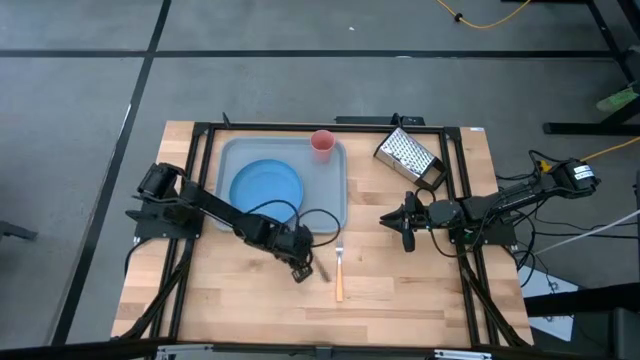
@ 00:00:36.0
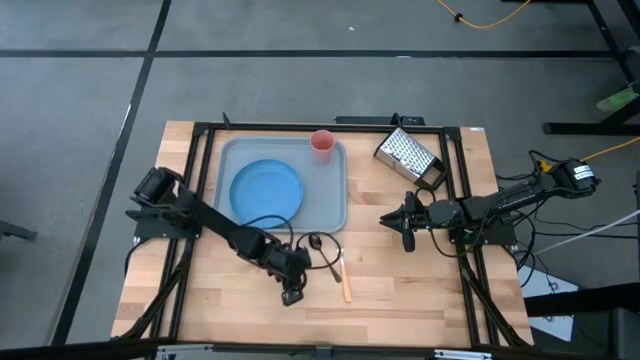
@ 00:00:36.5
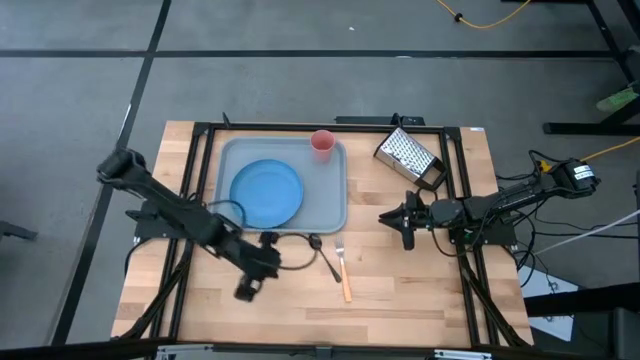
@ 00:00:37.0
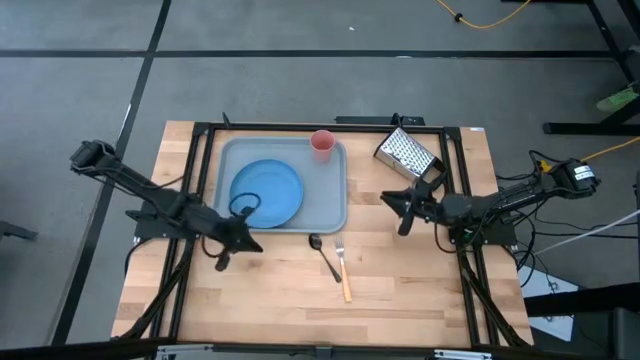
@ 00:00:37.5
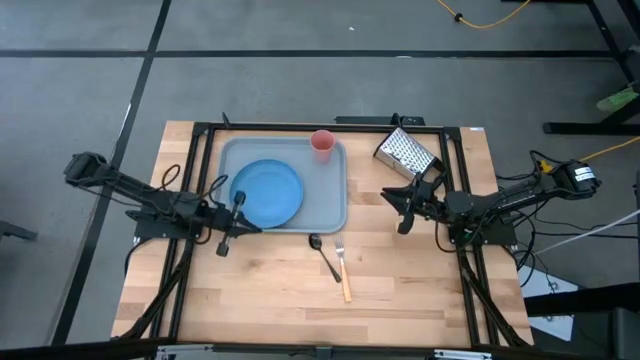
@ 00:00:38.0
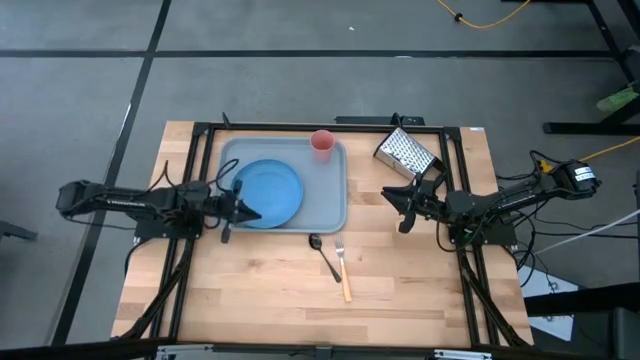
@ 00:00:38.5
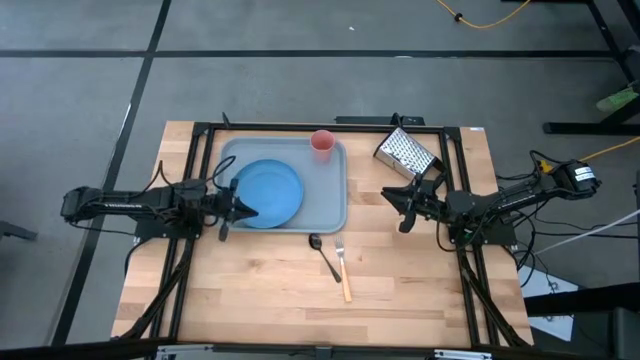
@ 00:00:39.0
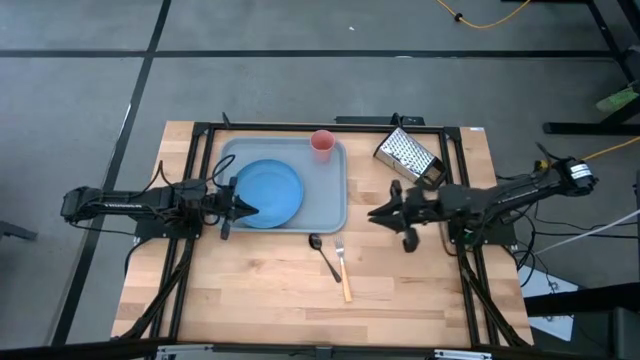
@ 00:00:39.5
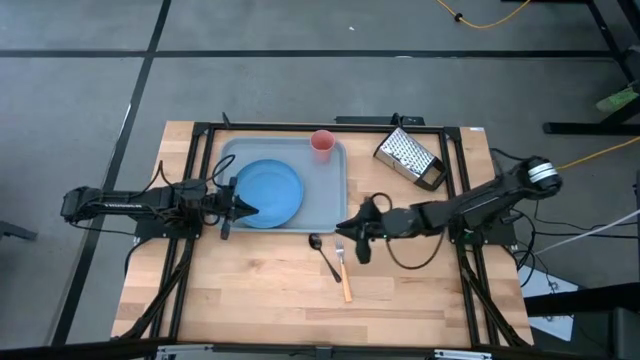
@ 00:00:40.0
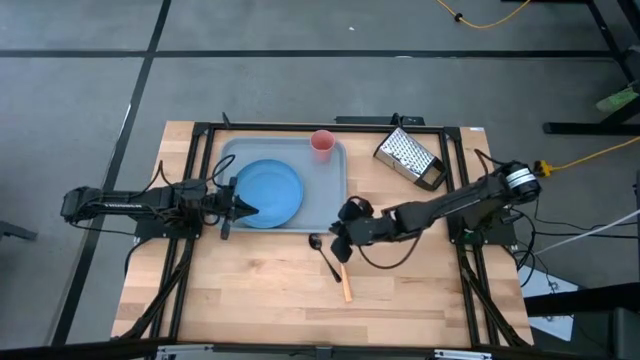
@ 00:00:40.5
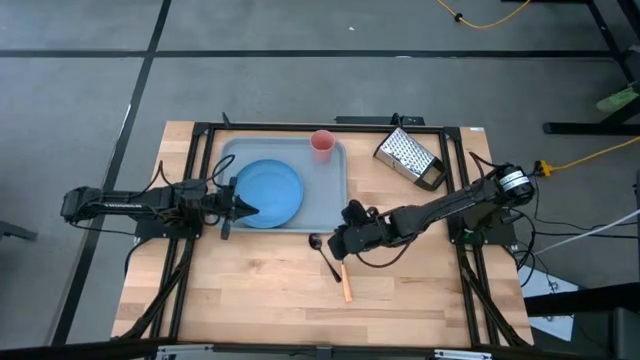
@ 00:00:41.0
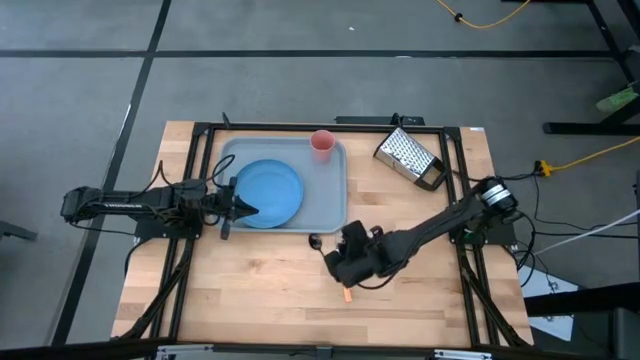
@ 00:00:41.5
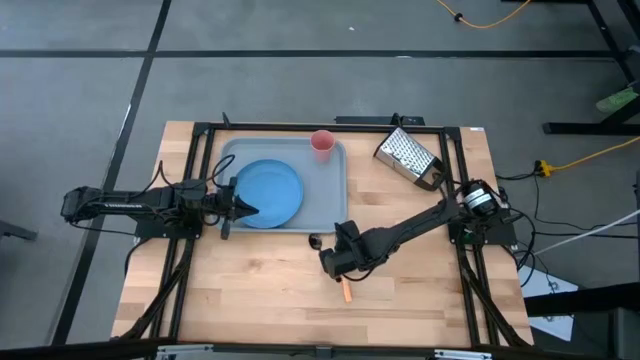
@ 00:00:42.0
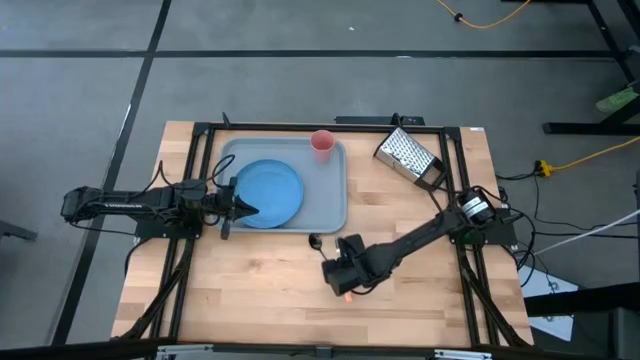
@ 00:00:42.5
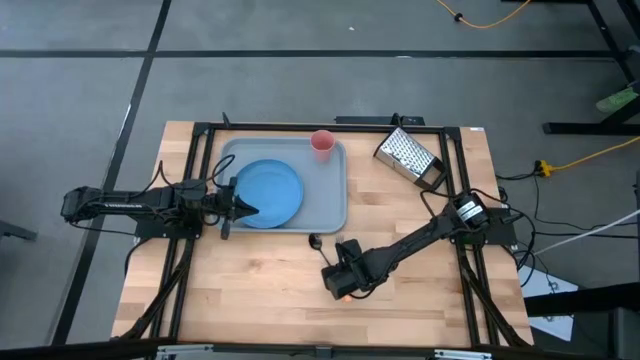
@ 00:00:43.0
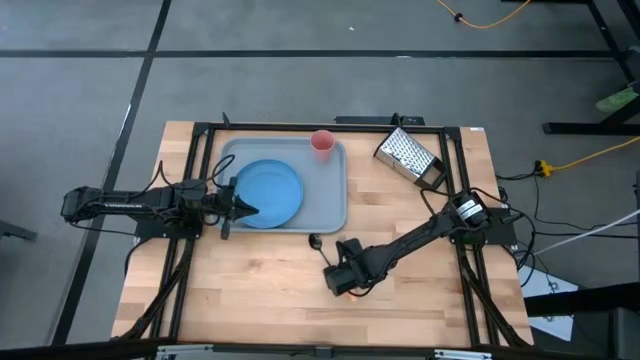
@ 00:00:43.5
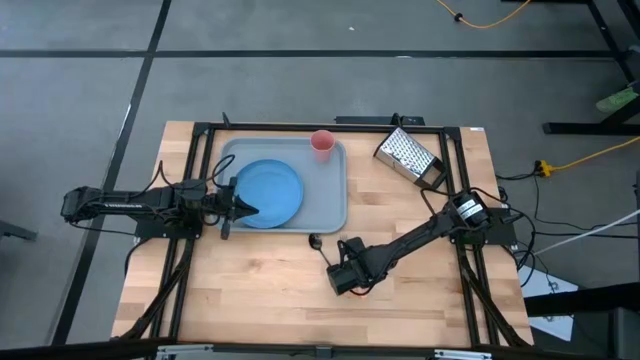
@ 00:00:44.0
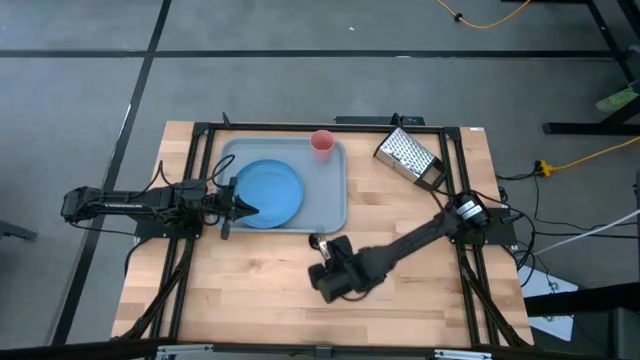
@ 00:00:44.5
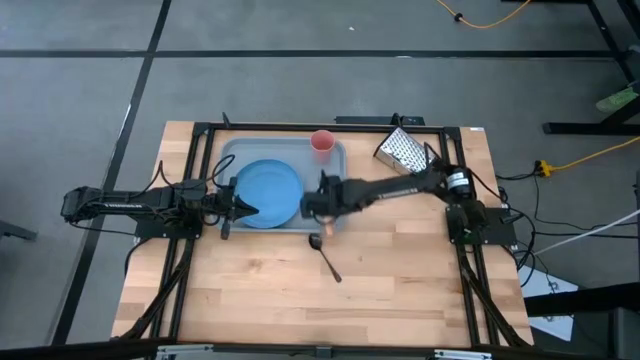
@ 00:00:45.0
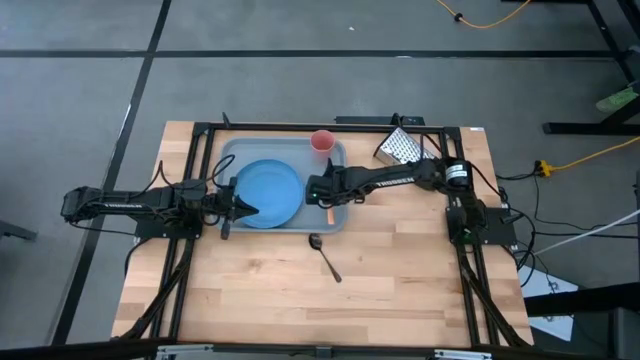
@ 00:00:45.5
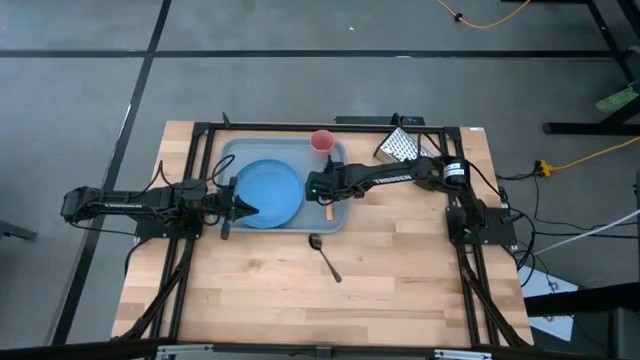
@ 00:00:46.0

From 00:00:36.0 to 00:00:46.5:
Task: Pick and place plate/cup/fork/spoon on tray
Put the orange fork to the right of the plate on the serving tray

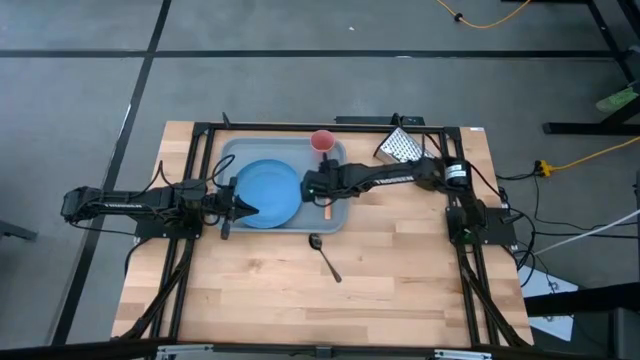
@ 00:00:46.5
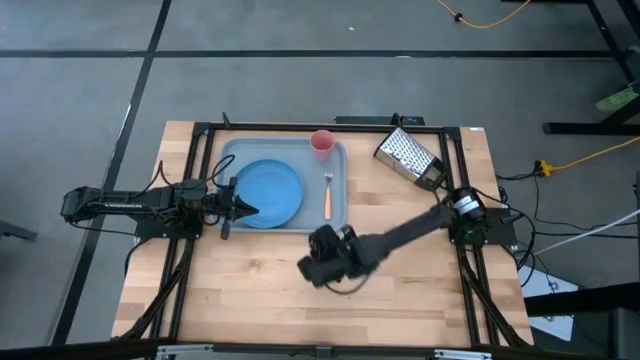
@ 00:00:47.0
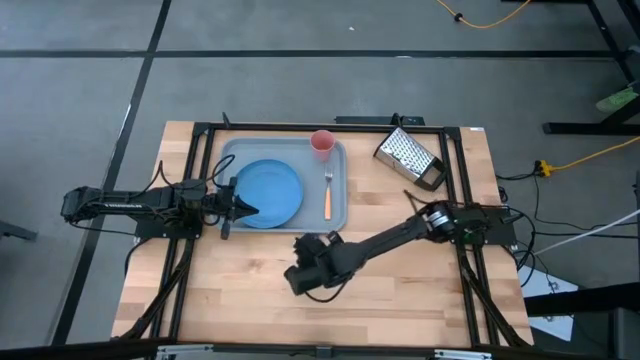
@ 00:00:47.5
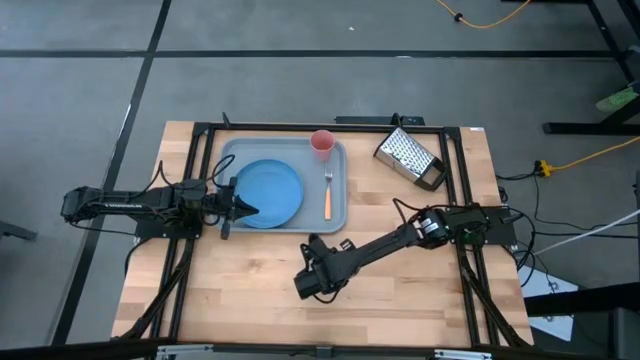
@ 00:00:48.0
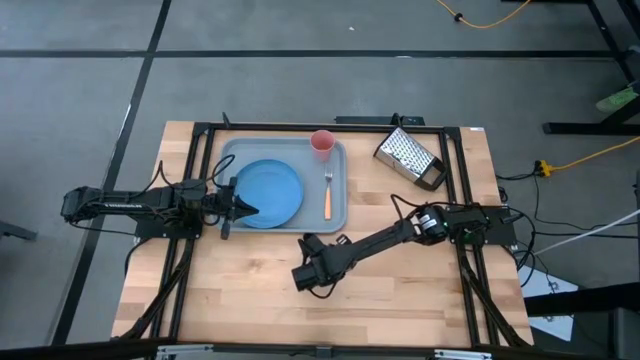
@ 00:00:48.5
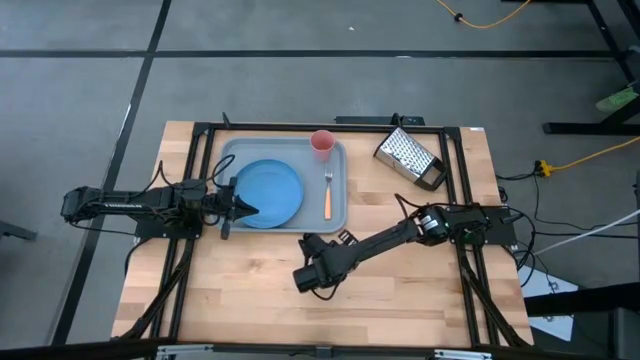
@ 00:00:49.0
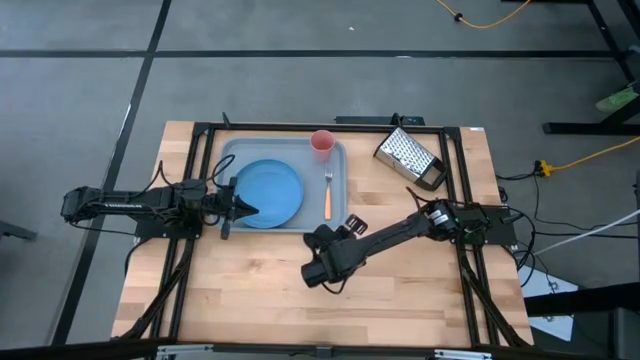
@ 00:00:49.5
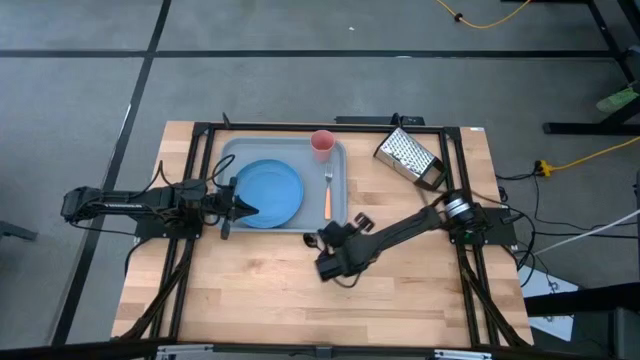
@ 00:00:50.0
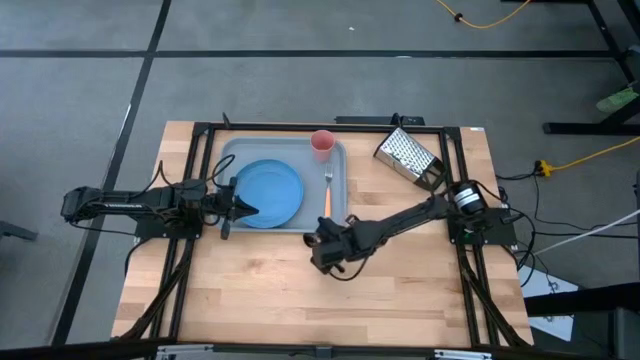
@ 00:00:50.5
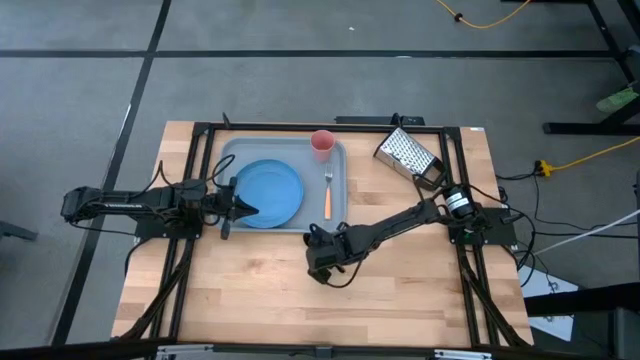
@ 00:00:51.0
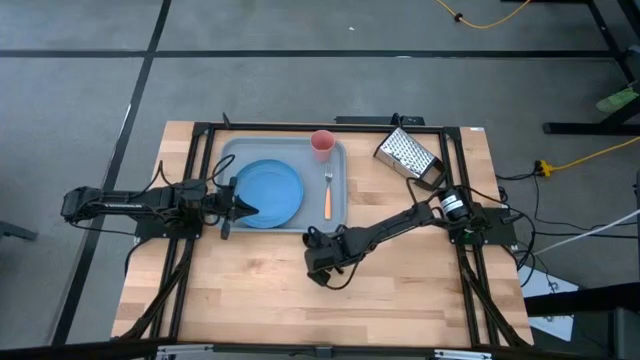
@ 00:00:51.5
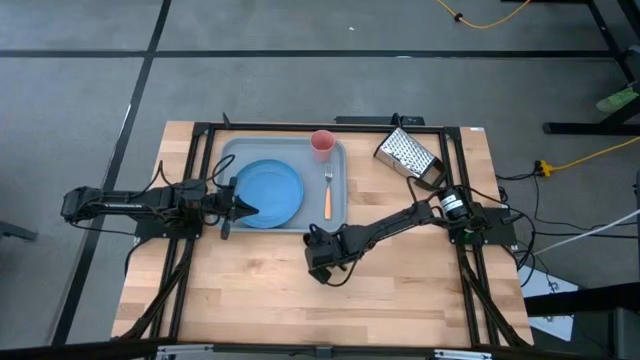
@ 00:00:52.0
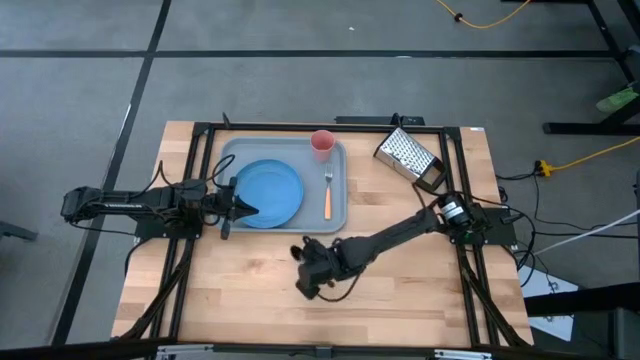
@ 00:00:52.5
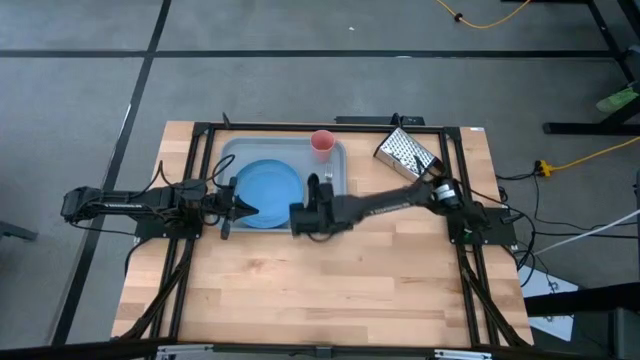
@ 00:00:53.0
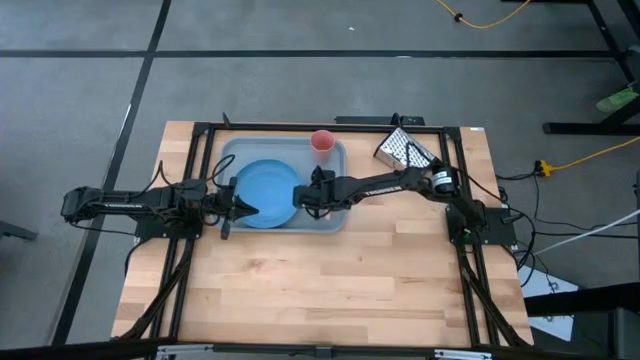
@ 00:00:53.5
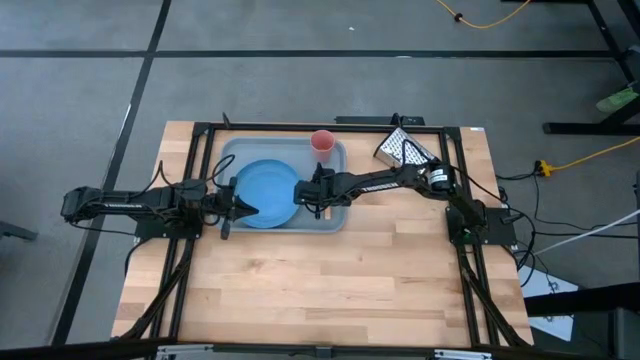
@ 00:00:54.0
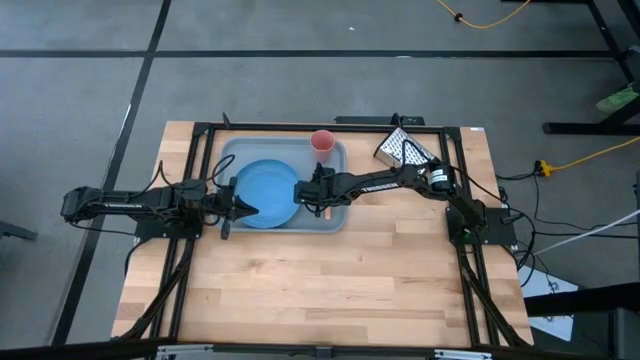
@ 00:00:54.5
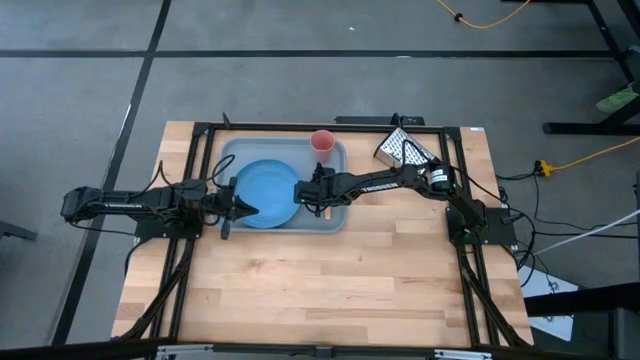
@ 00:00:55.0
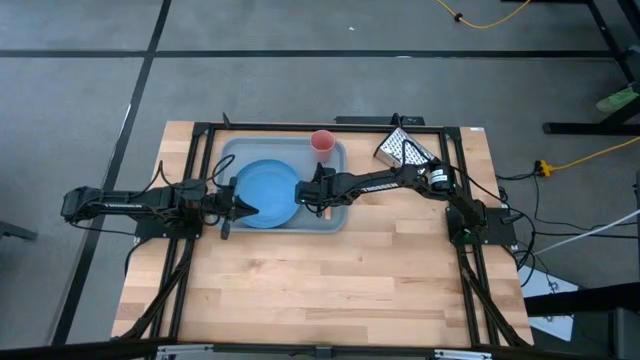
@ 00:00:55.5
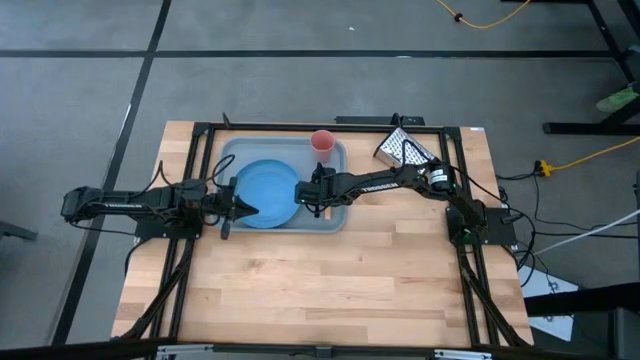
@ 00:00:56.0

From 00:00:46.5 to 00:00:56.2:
Put the black spoon to the left of the orange fork on the serving tray

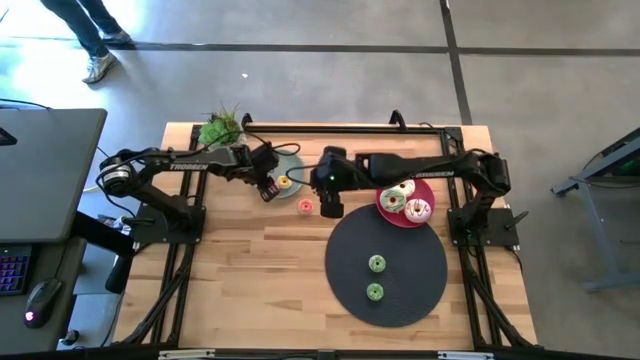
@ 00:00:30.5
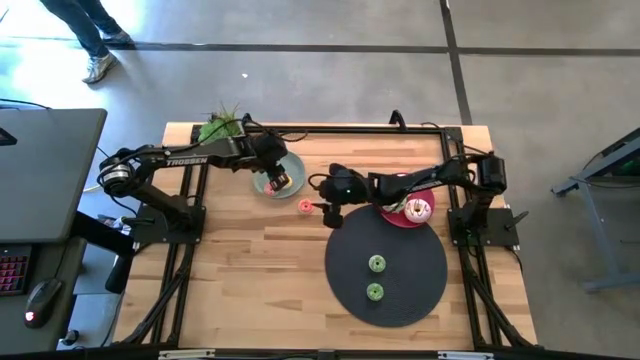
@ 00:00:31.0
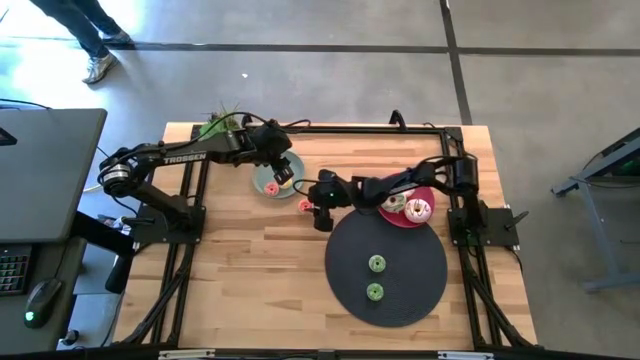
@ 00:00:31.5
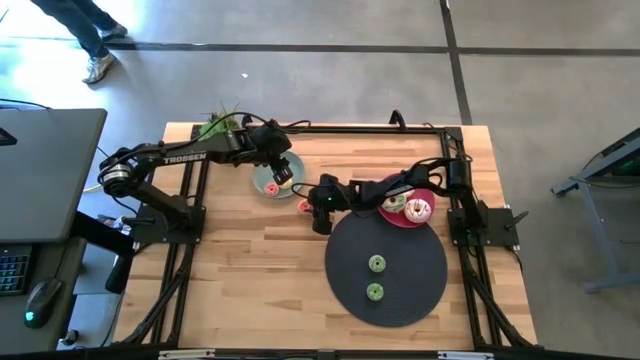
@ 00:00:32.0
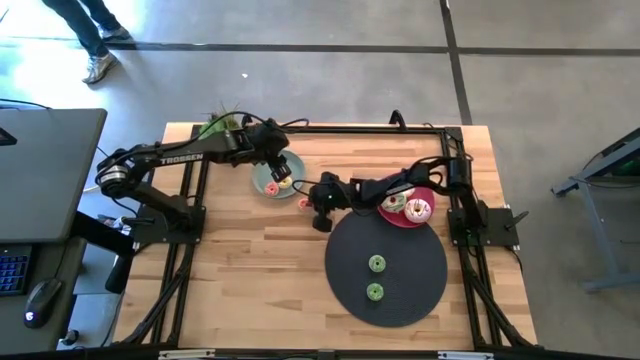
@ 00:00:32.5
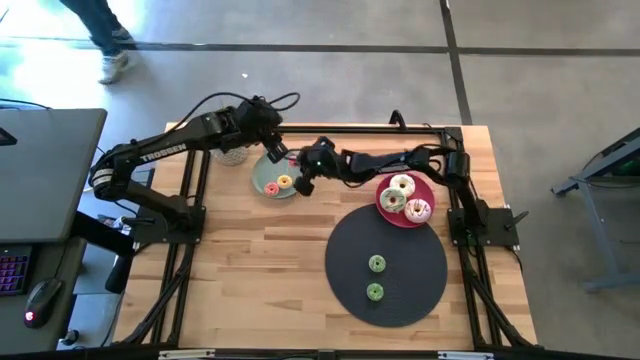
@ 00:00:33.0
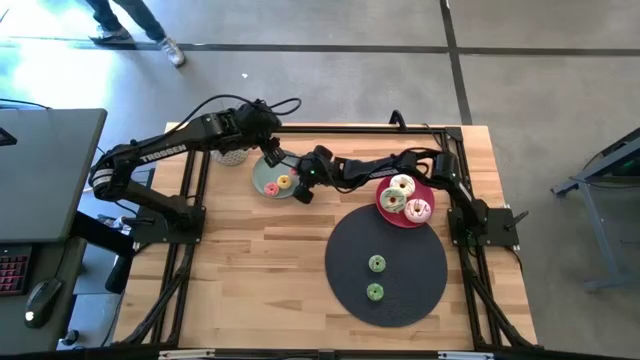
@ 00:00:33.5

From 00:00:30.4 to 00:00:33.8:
Task: Pick & Place donuts
Put the small pink donut on the gray plate
